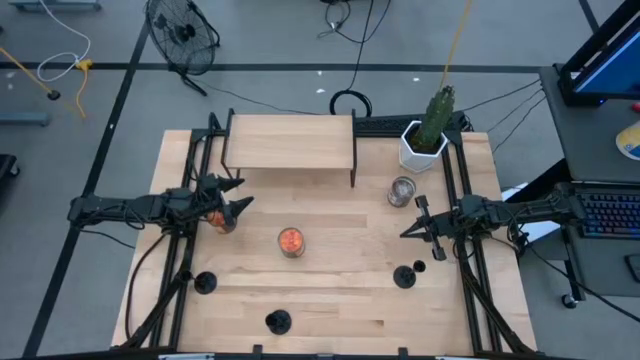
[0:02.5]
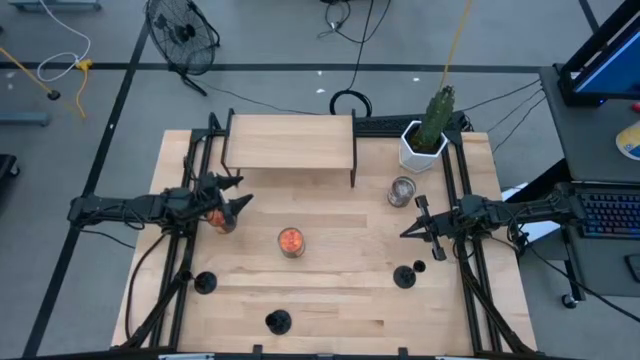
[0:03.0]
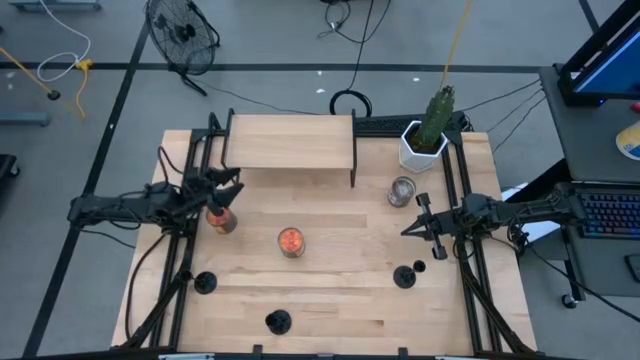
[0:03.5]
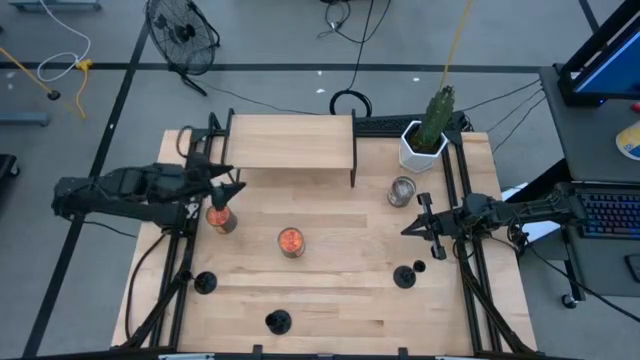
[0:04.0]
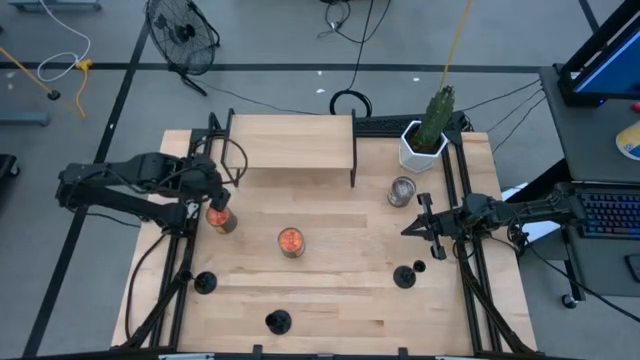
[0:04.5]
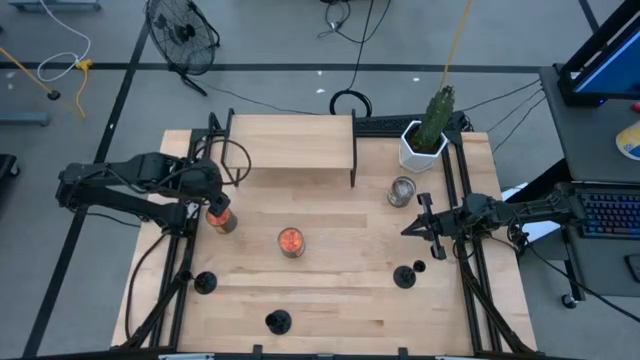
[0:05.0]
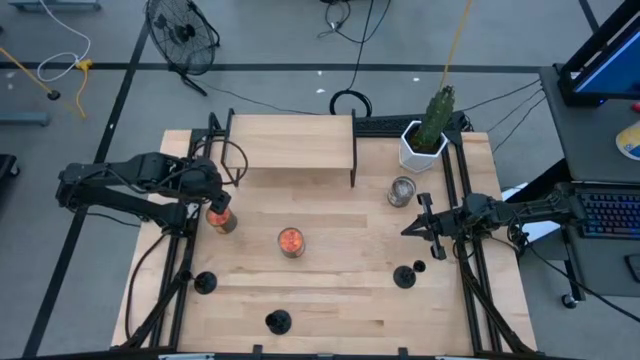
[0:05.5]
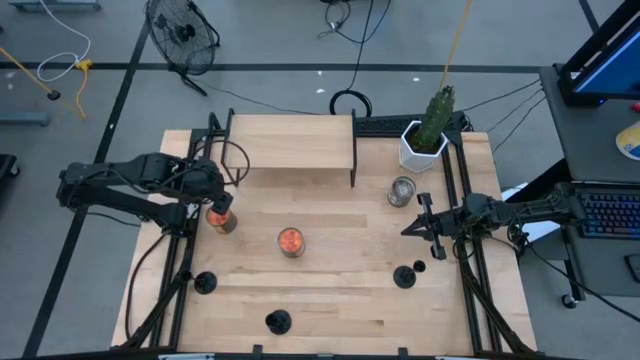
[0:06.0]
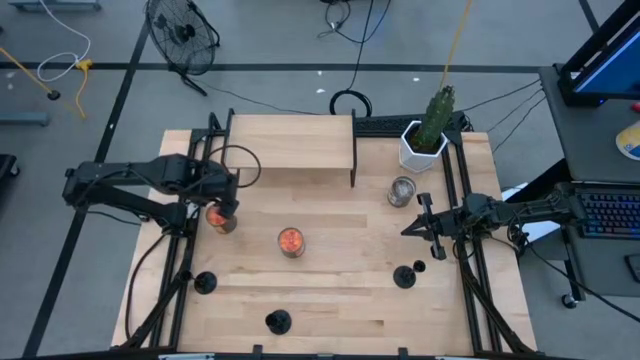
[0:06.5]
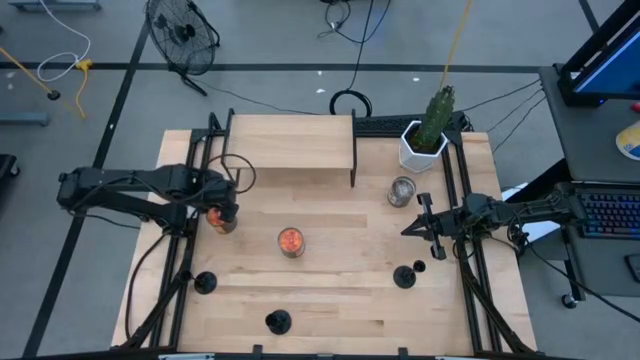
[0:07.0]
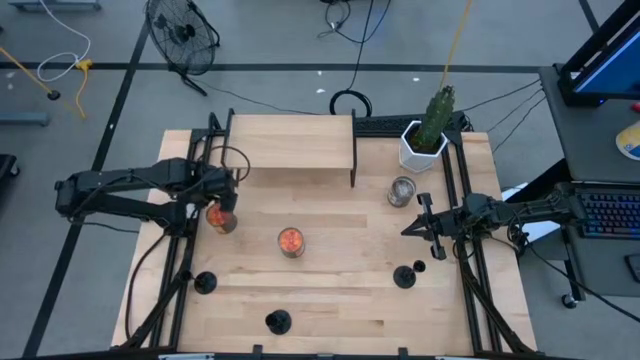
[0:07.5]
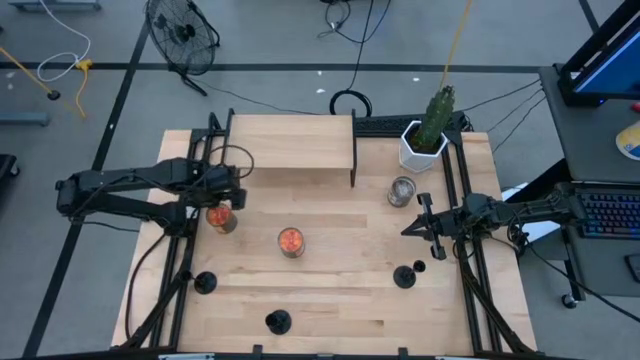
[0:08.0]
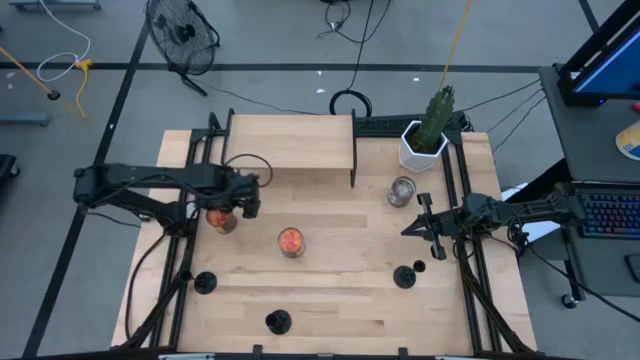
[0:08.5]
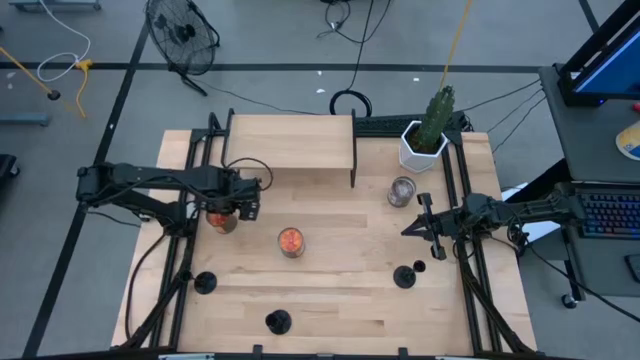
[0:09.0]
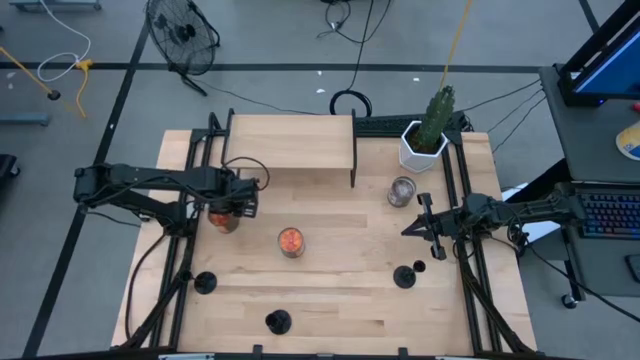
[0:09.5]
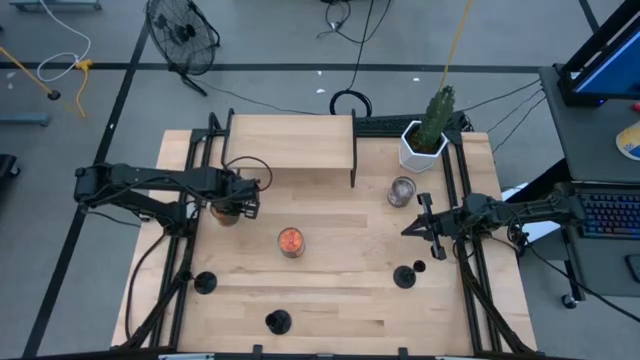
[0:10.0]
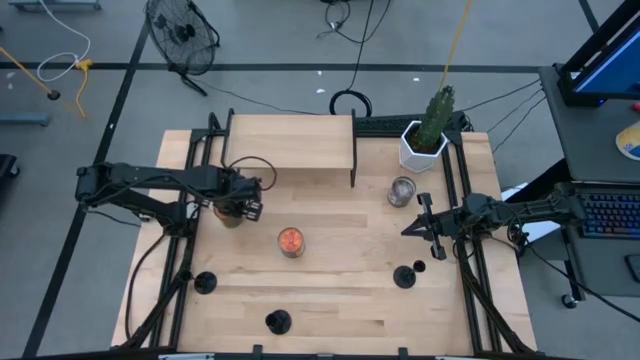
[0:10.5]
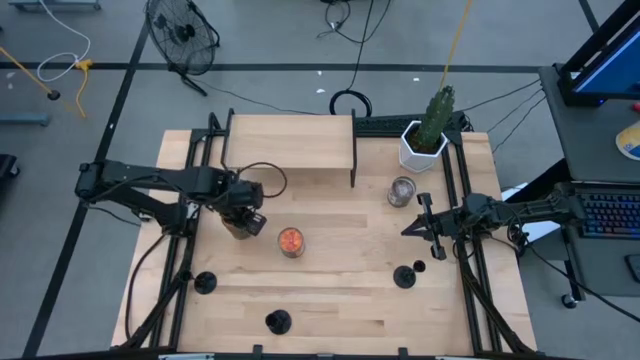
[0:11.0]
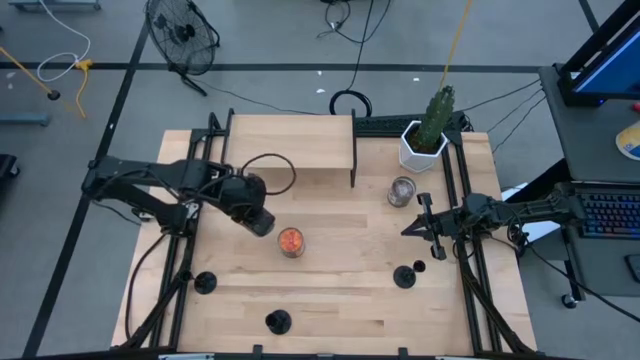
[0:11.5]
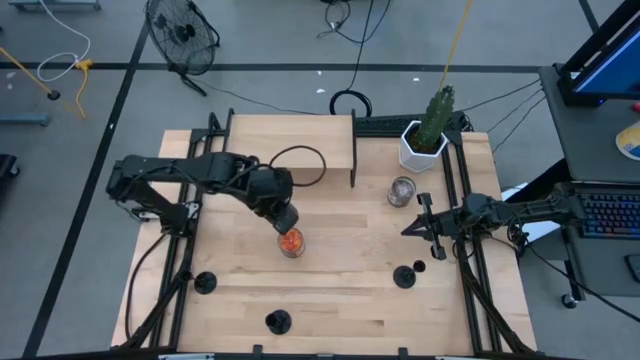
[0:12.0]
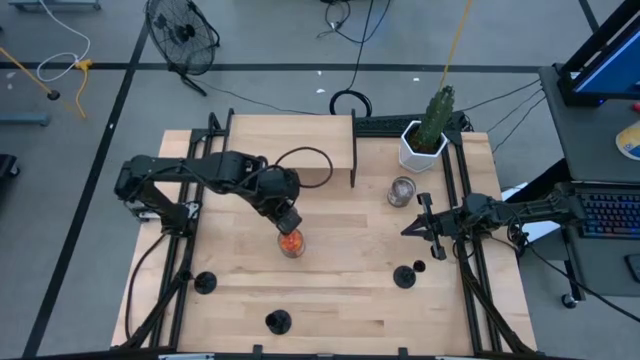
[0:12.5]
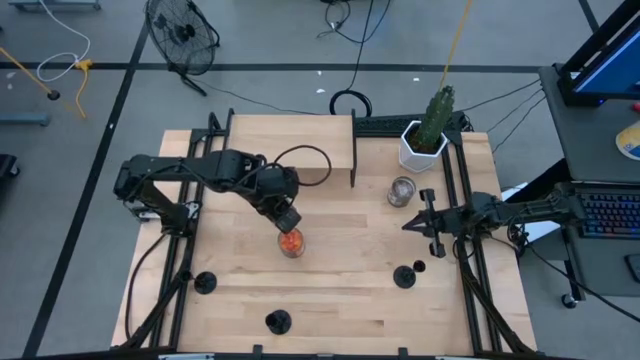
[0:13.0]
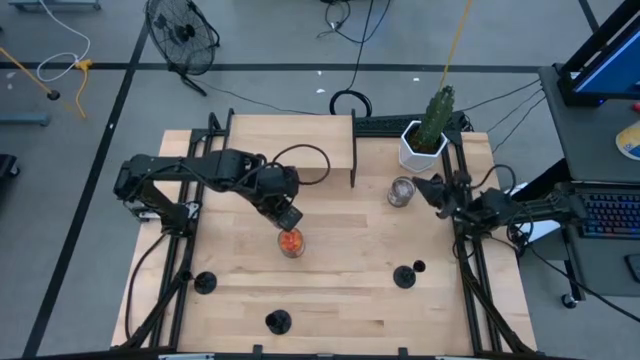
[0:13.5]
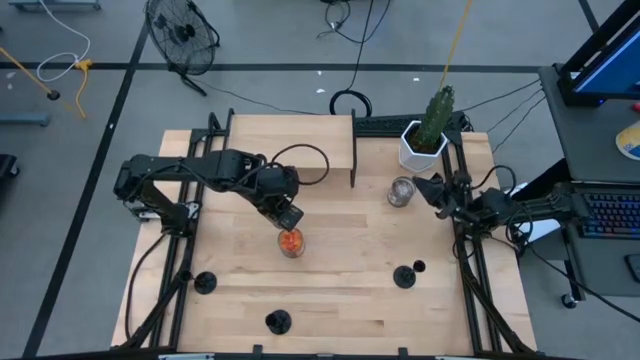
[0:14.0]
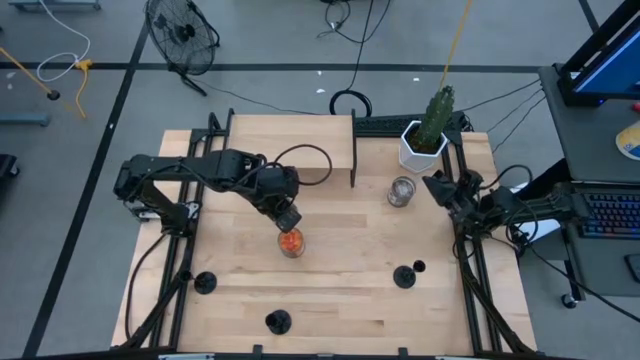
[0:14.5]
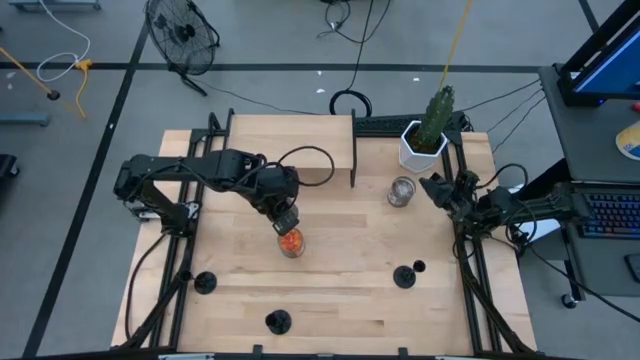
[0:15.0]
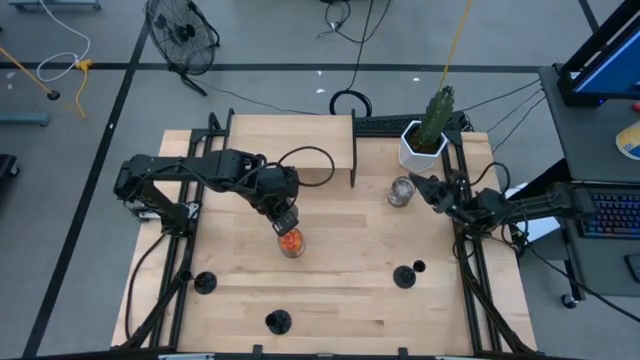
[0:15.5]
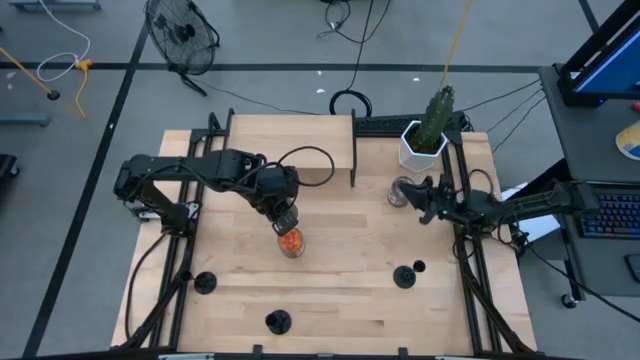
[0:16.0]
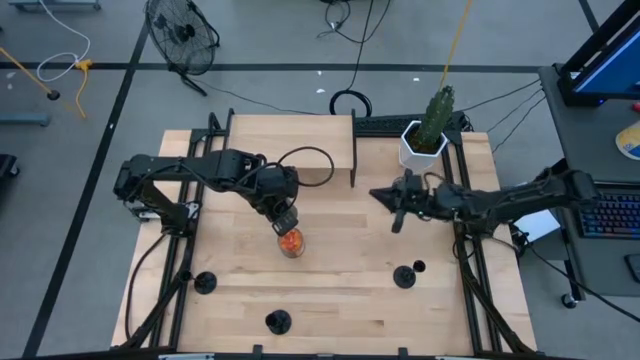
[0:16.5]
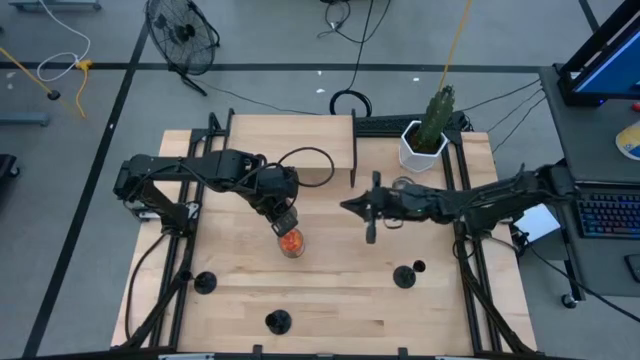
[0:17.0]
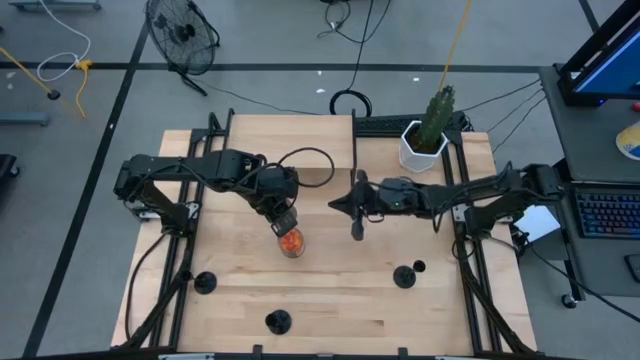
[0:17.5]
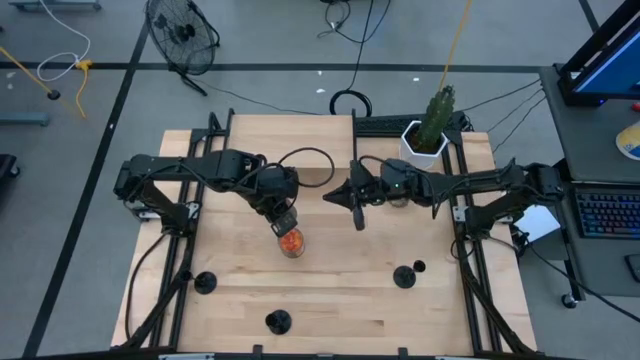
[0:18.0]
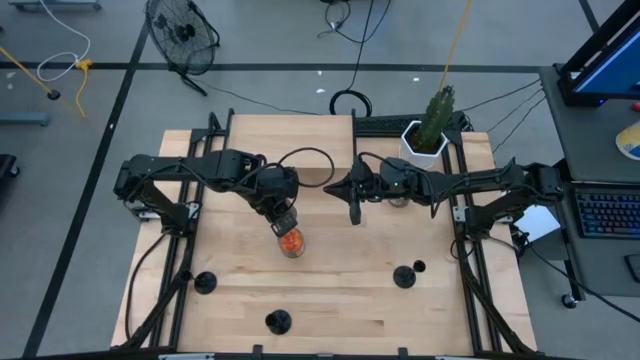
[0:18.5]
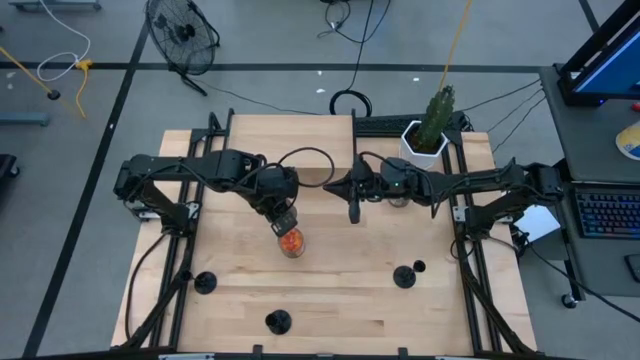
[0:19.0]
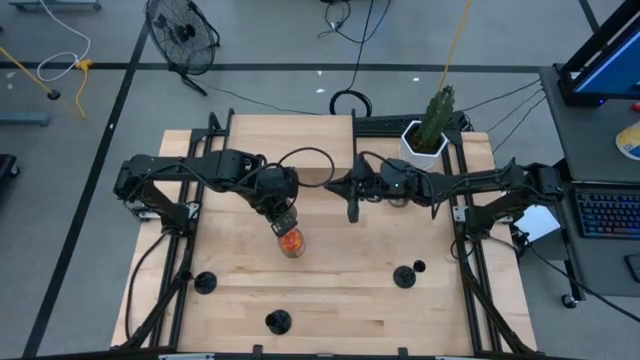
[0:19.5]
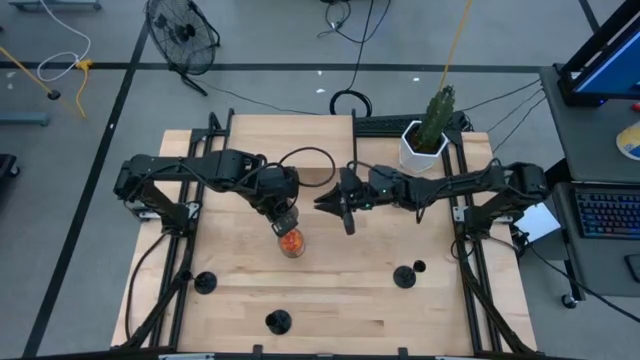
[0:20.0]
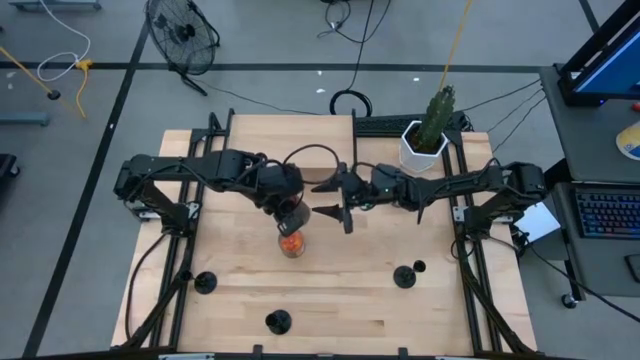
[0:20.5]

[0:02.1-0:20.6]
Task: Pick & Place candle stick holders
Put the top orange scented candle on the shelf
